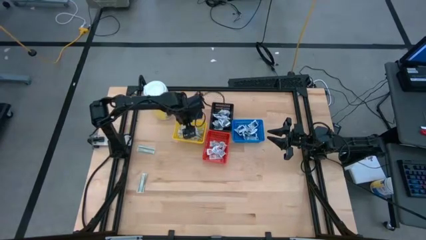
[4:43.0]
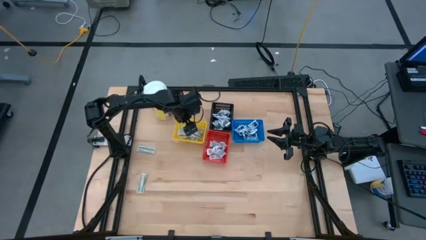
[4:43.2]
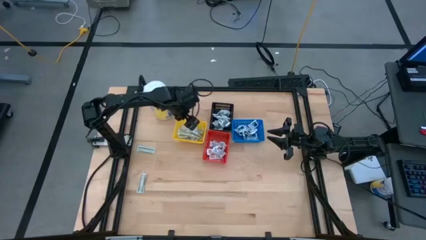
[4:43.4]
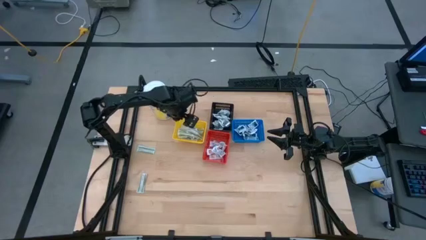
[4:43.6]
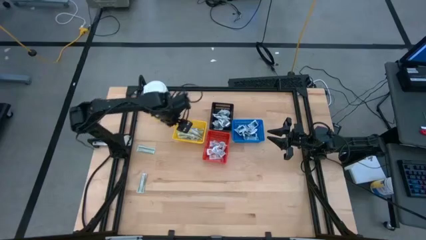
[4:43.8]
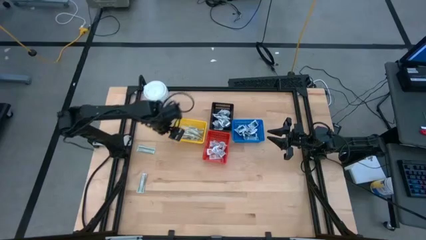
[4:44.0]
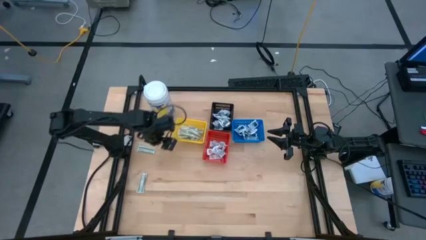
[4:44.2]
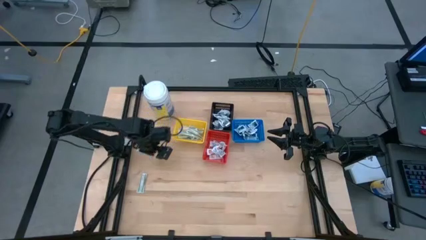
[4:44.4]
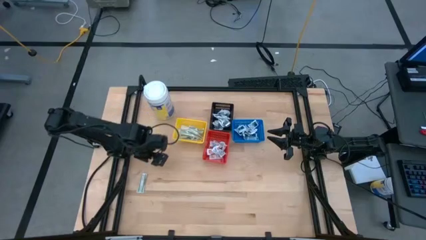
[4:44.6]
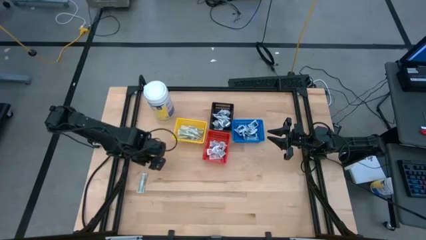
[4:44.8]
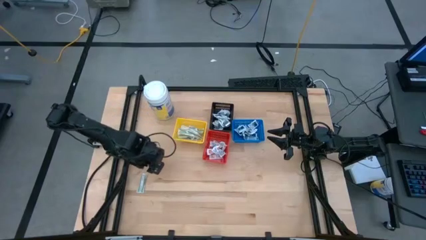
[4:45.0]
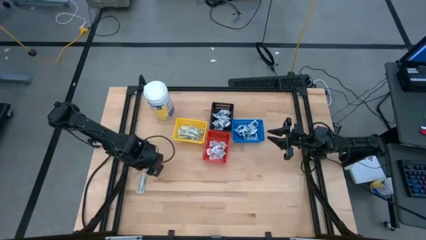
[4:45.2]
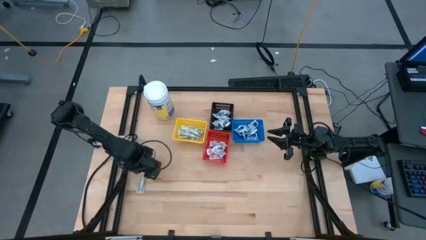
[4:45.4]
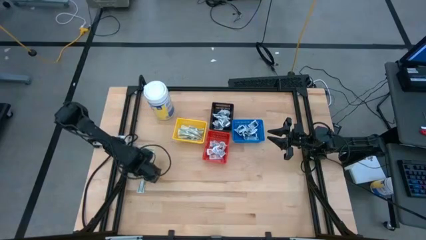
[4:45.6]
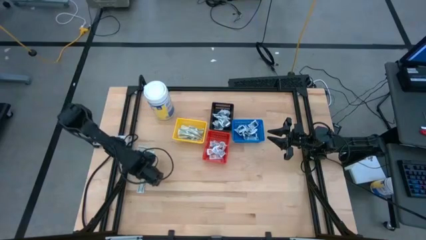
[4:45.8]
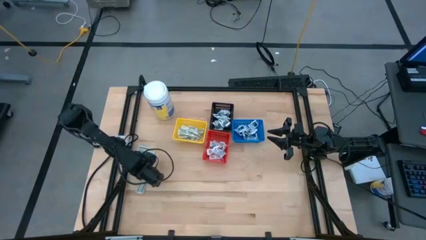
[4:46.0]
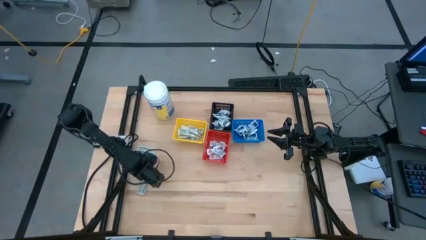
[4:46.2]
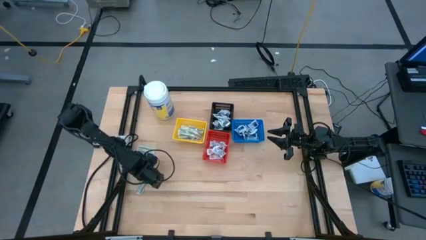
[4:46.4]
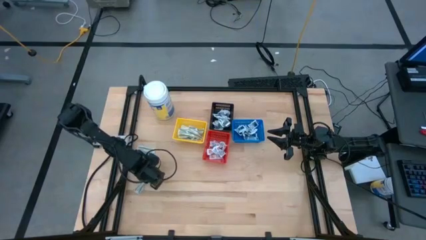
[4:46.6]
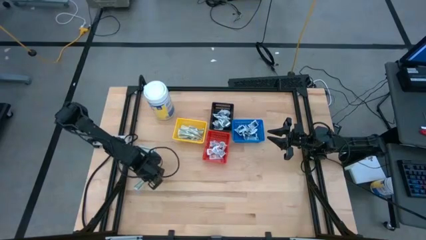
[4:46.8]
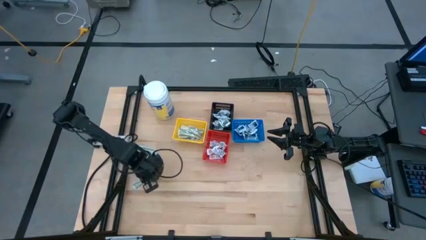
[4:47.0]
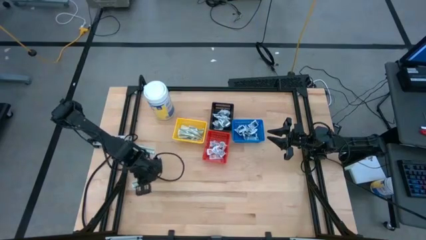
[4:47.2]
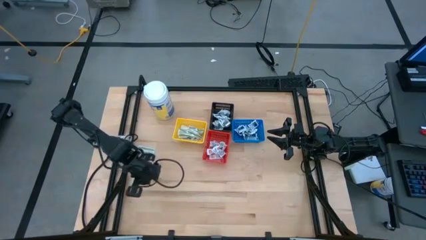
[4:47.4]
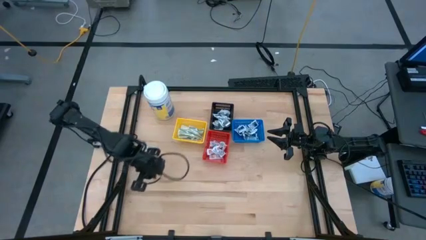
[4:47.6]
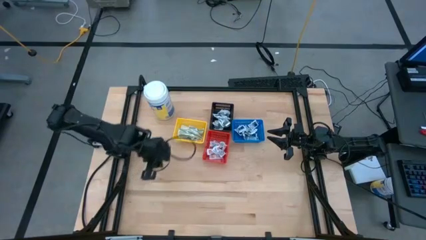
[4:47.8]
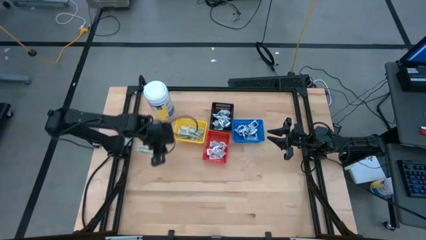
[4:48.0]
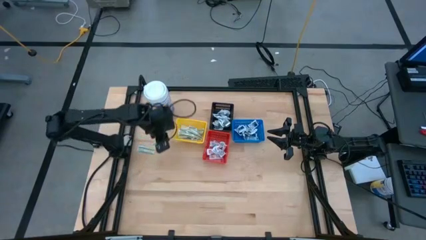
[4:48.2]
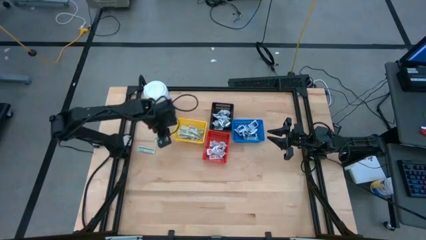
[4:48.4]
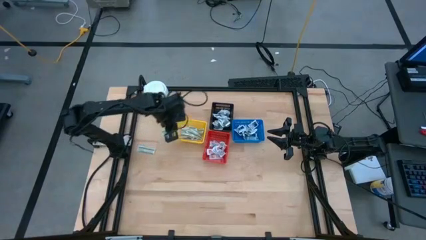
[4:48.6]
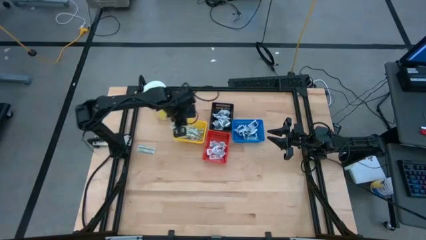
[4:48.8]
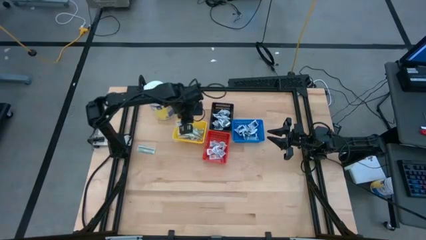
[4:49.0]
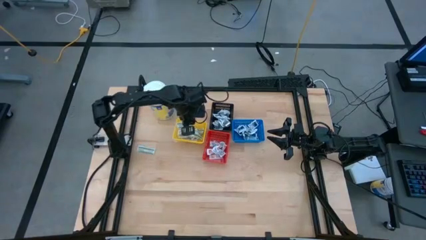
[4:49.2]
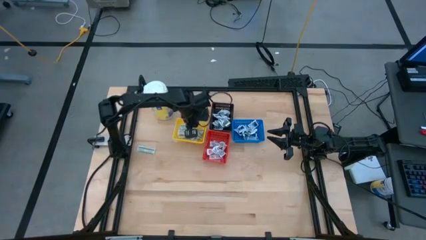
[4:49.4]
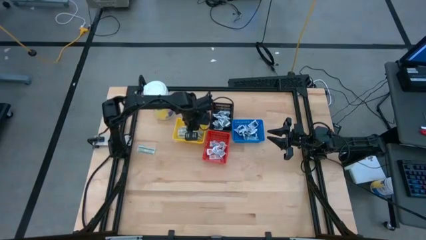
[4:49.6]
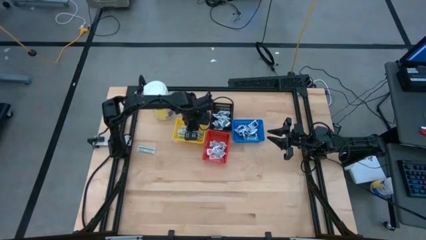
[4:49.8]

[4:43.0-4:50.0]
Task: Pick & Place First Aid Supplies
Put the bandage pack into the yellow bin

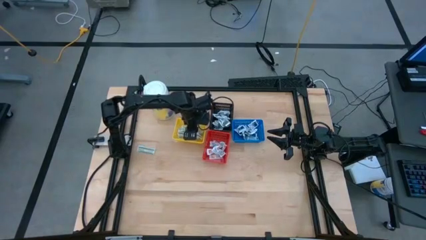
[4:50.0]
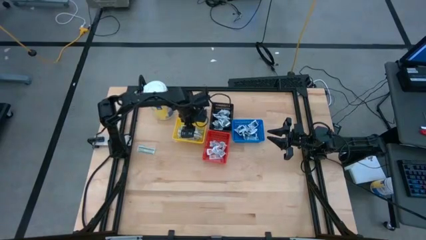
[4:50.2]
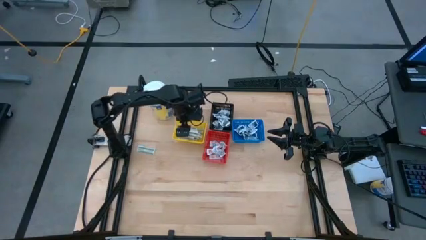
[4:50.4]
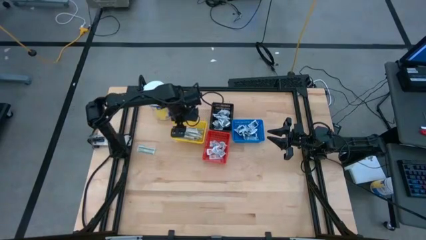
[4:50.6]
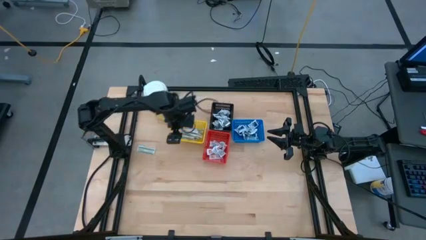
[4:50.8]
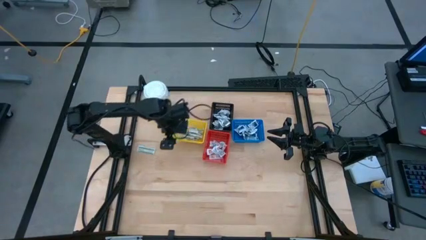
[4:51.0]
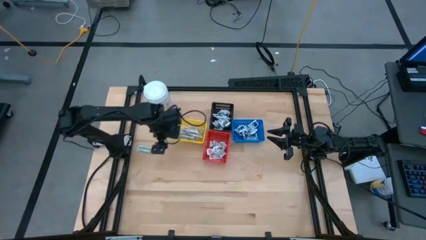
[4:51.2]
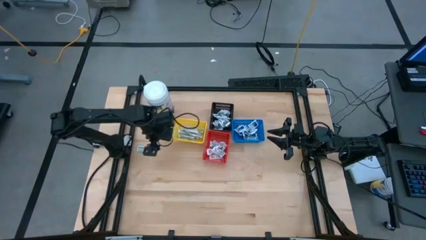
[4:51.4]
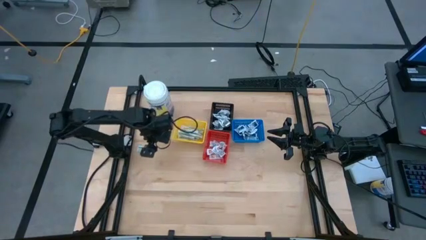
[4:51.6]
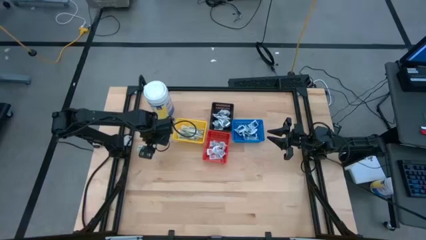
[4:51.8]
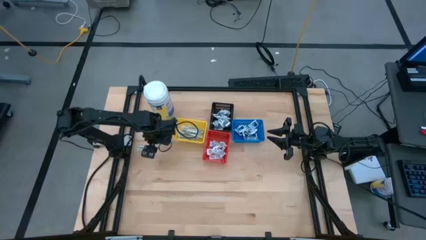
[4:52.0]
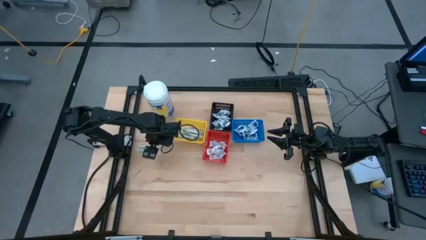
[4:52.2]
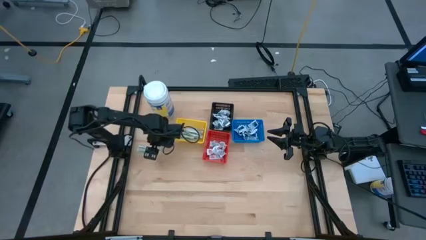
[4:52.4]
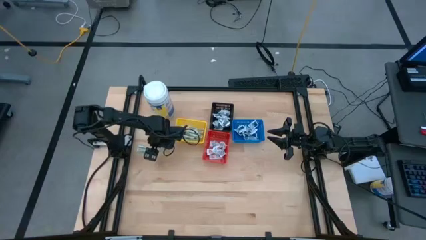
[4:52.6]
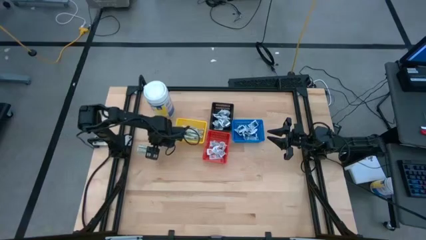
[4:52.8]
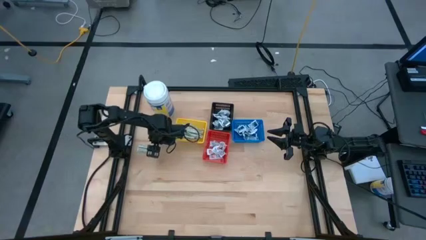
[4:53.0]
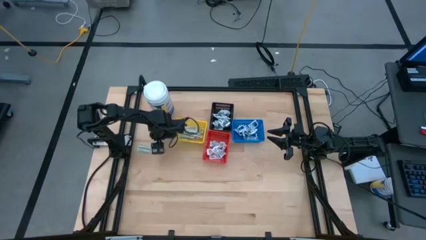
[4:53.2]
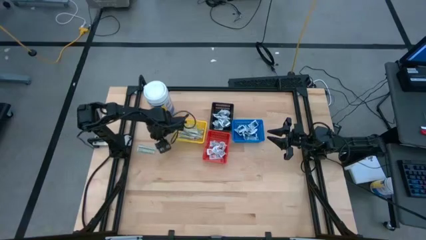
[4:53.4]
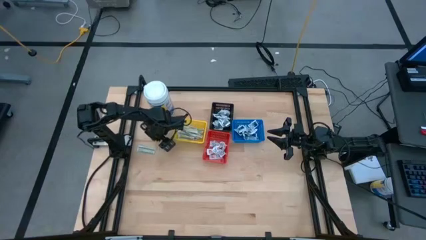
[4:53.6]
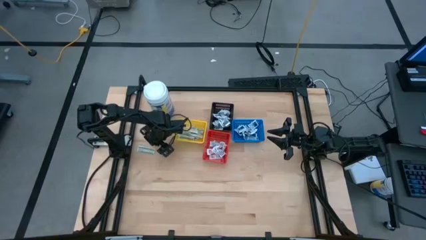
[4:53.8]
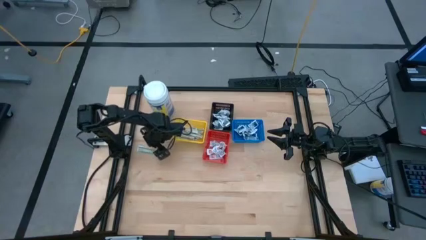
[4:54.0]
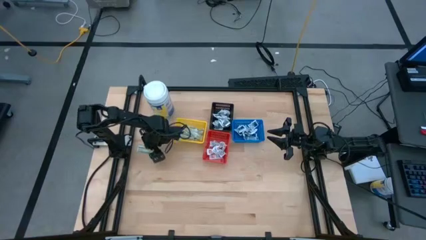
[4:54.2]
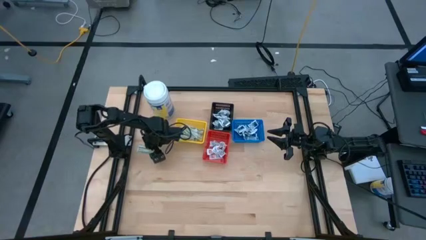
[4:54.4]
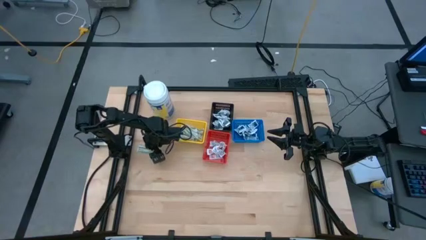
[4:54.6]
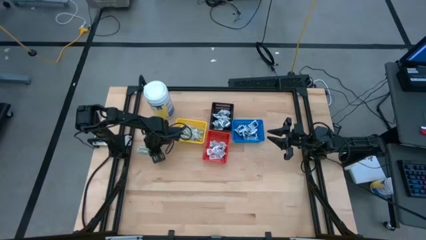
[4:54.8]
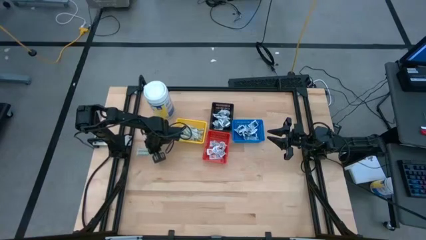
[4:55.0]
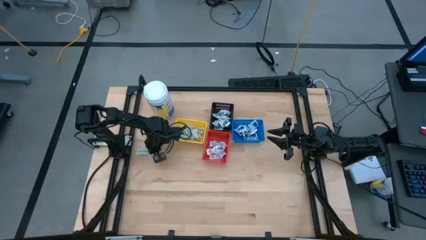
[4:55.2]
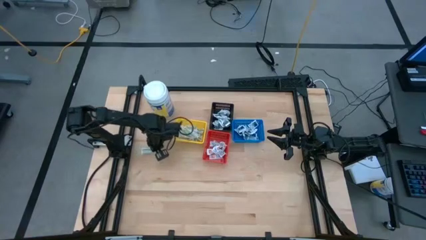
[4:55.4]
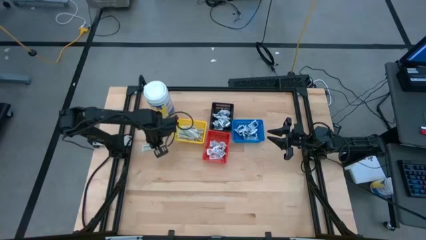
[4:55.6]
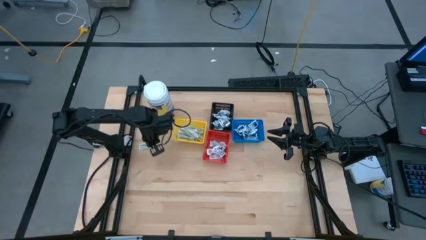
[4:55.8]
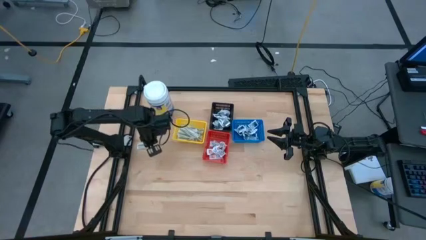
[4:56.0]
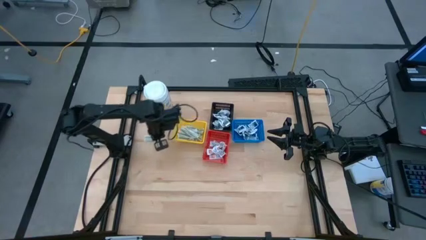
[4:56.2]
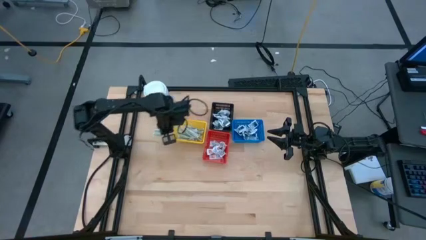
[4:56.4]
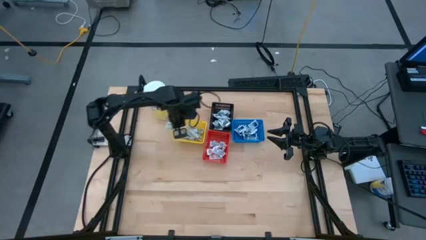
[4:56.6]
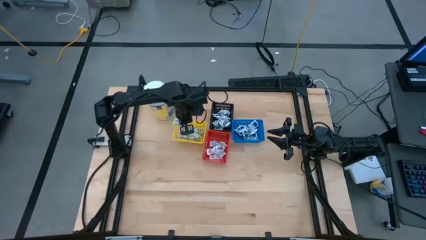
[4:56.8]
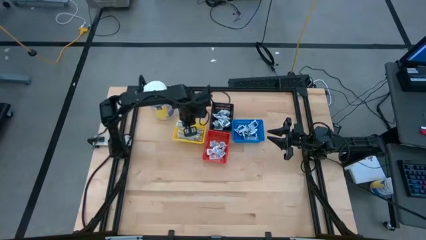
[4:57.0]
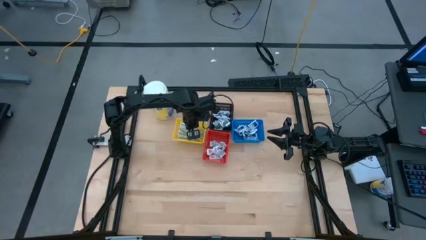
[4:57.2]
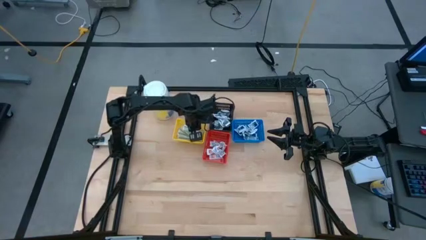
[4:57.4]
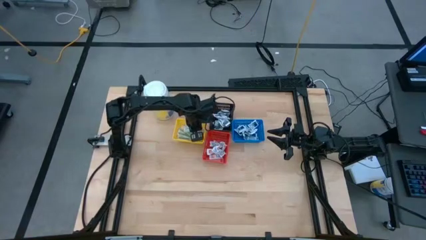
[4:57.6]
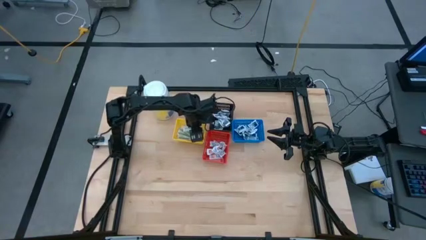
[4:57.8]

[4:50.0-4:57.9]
Put the bandage pack into the yellow bin
